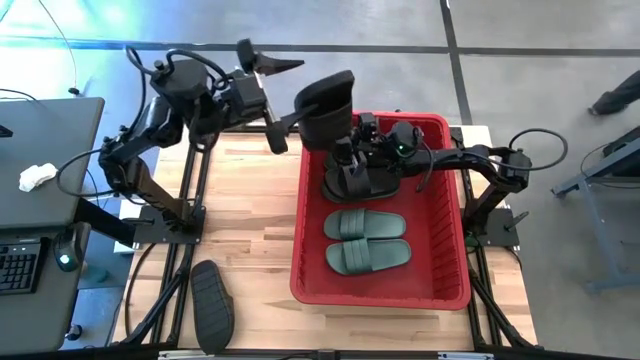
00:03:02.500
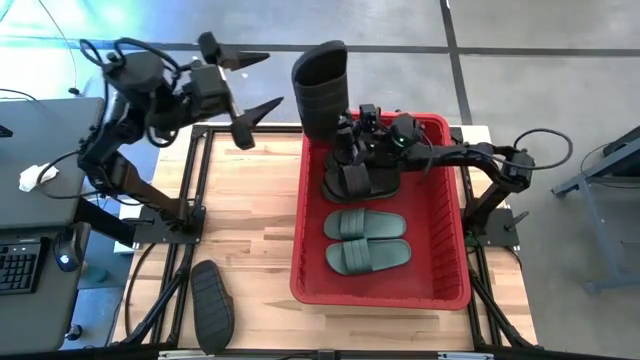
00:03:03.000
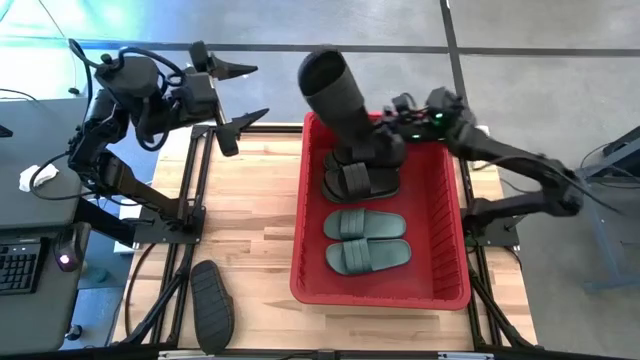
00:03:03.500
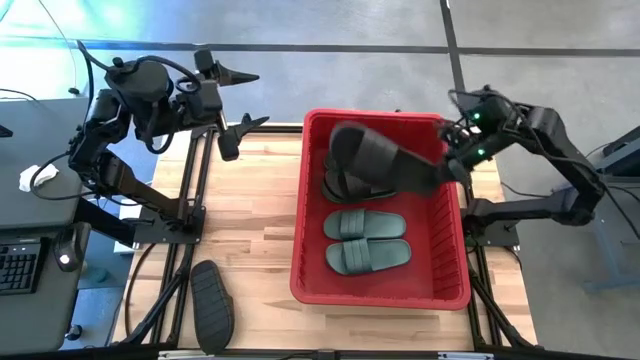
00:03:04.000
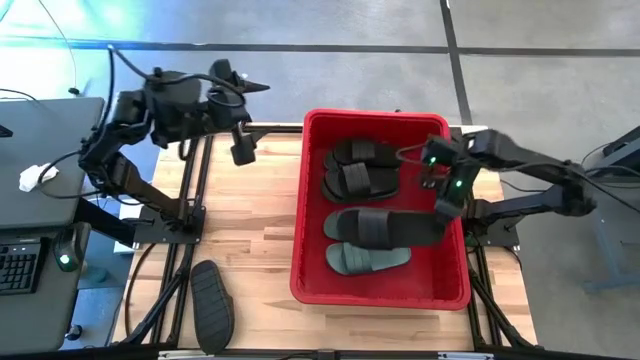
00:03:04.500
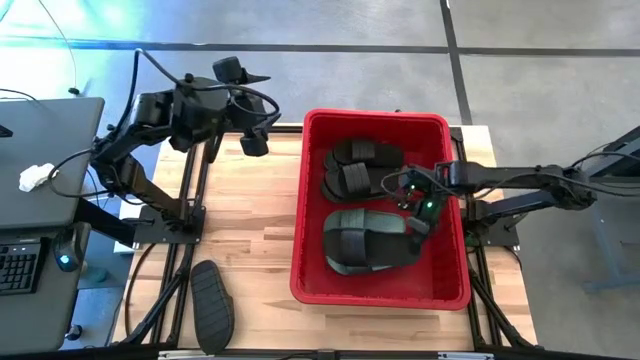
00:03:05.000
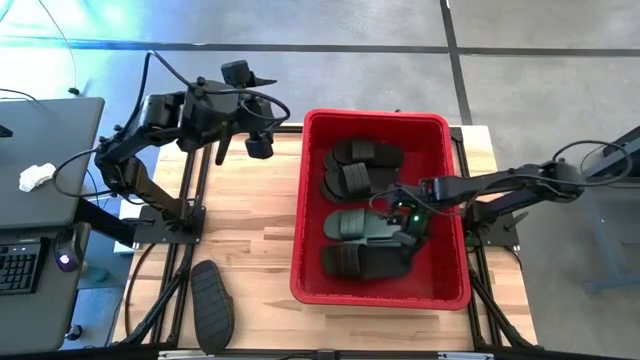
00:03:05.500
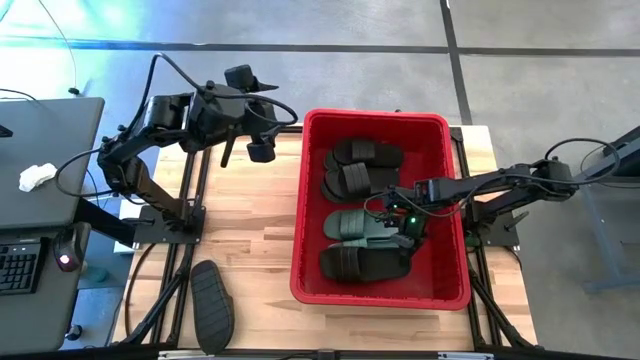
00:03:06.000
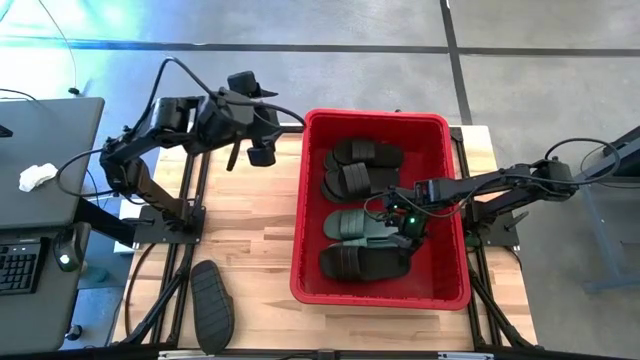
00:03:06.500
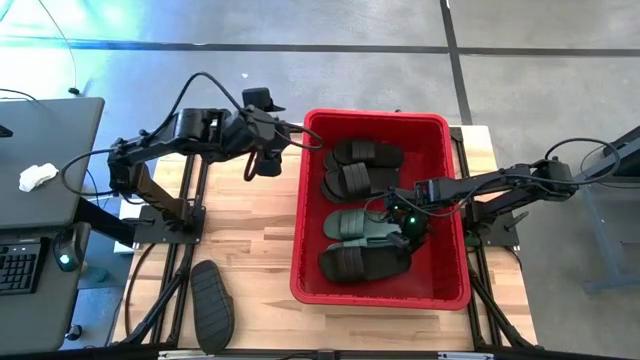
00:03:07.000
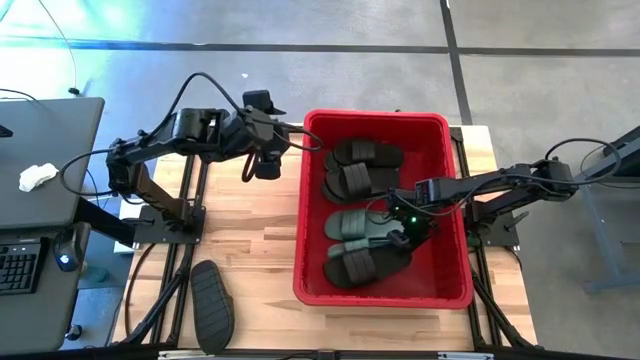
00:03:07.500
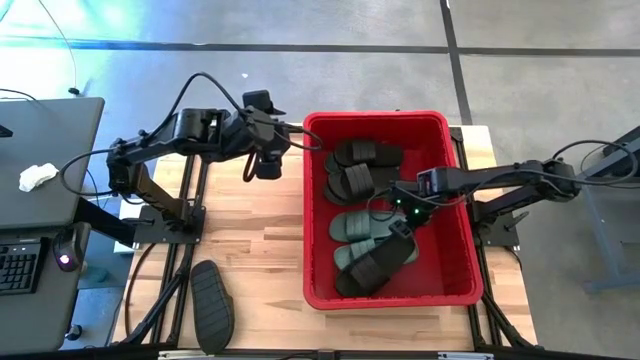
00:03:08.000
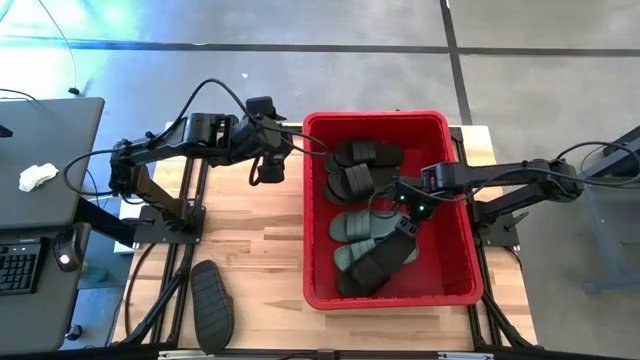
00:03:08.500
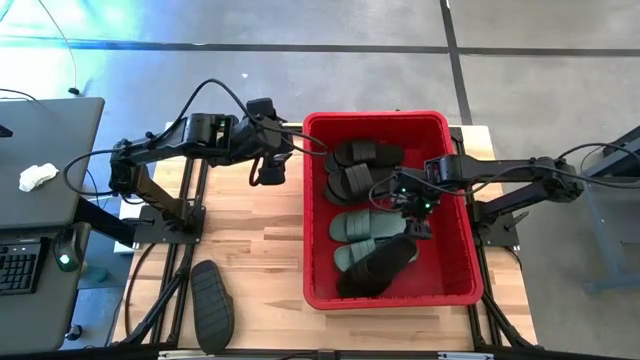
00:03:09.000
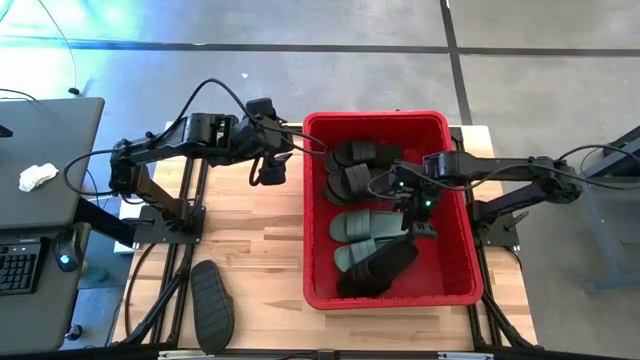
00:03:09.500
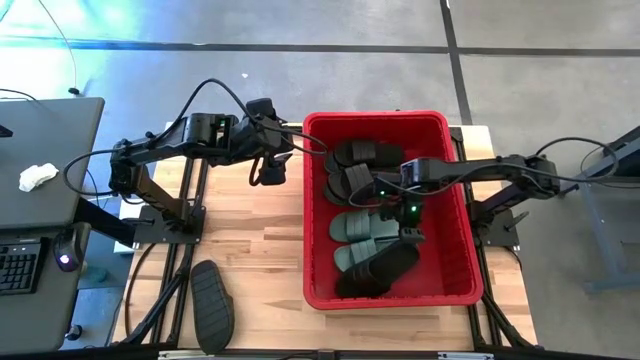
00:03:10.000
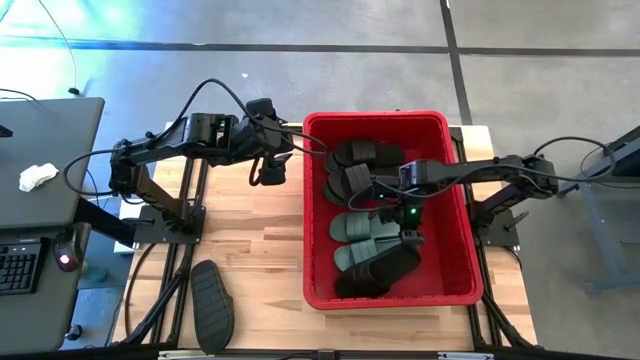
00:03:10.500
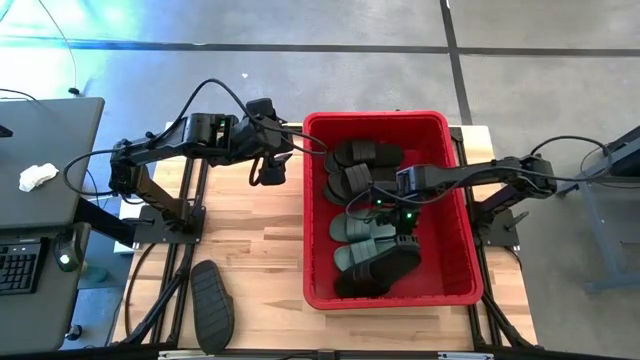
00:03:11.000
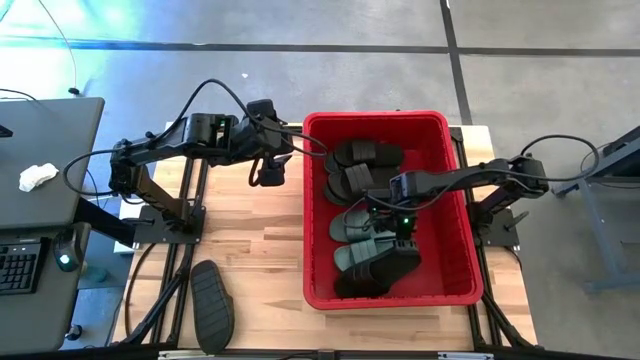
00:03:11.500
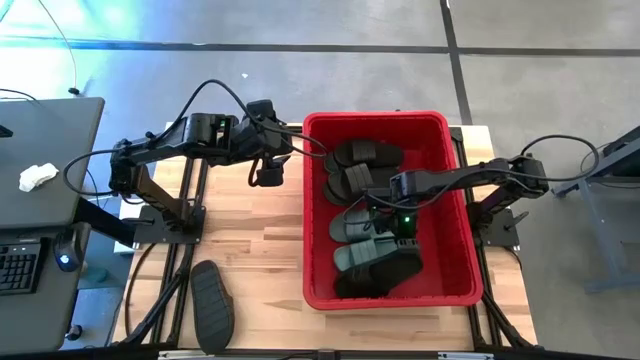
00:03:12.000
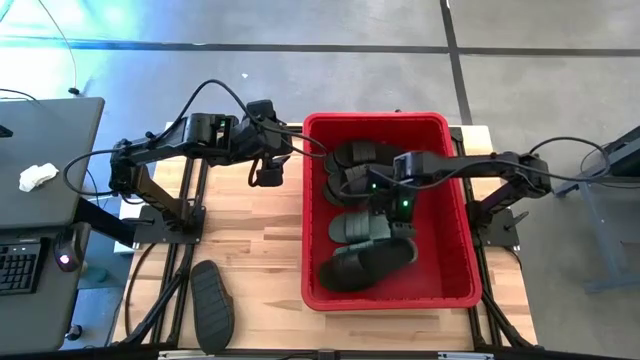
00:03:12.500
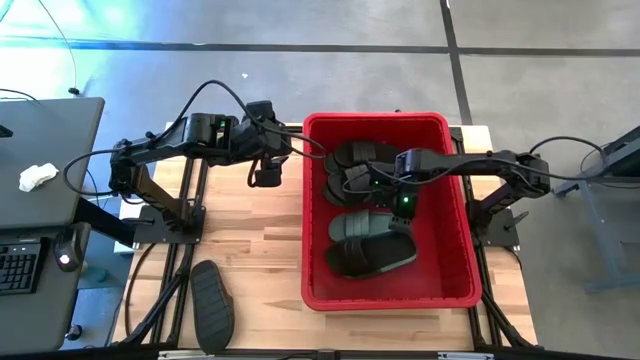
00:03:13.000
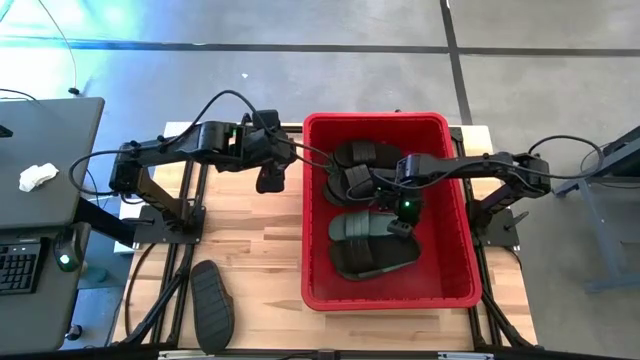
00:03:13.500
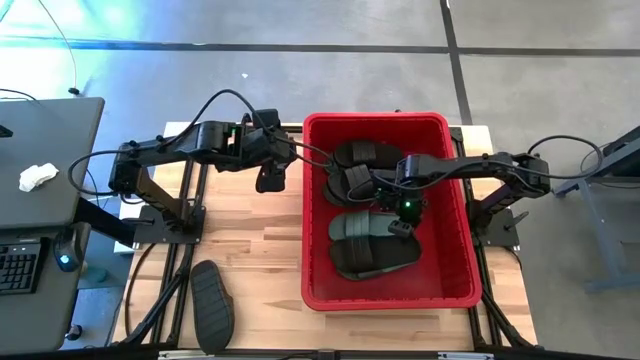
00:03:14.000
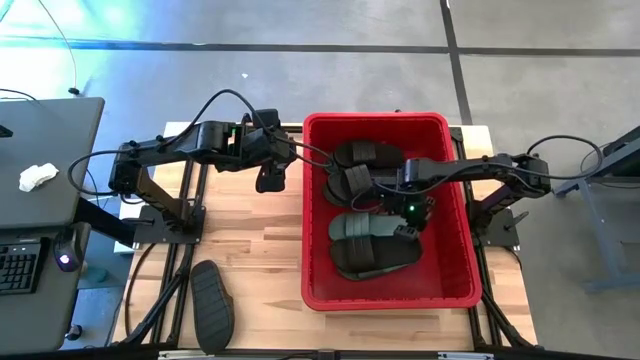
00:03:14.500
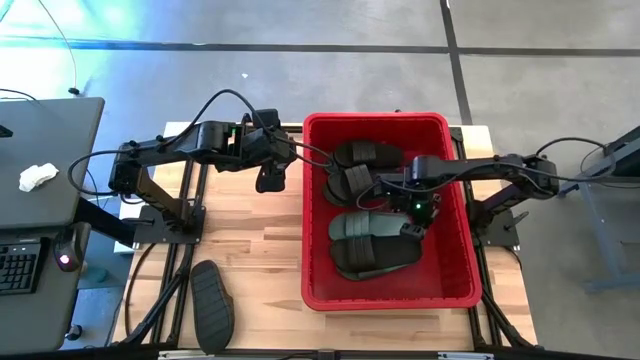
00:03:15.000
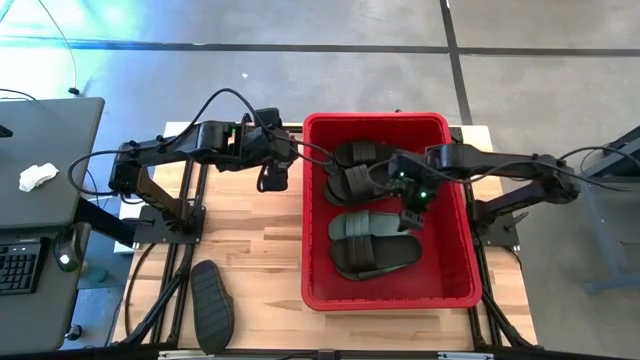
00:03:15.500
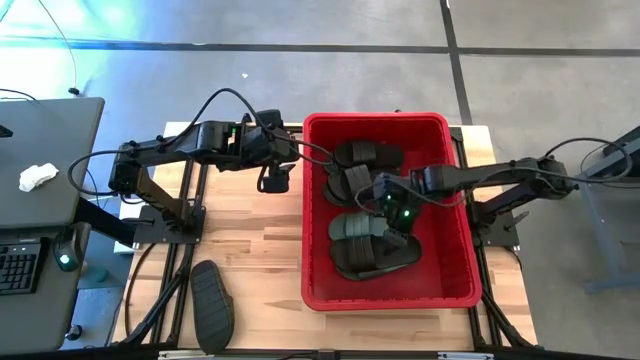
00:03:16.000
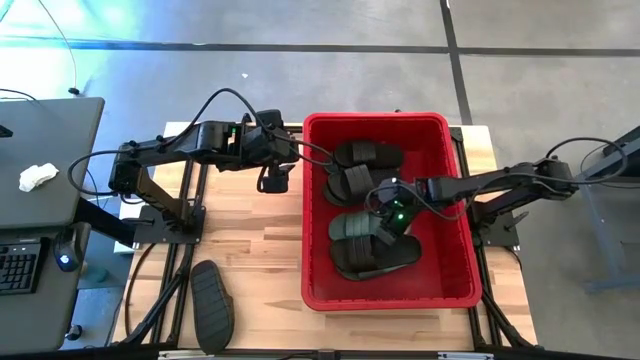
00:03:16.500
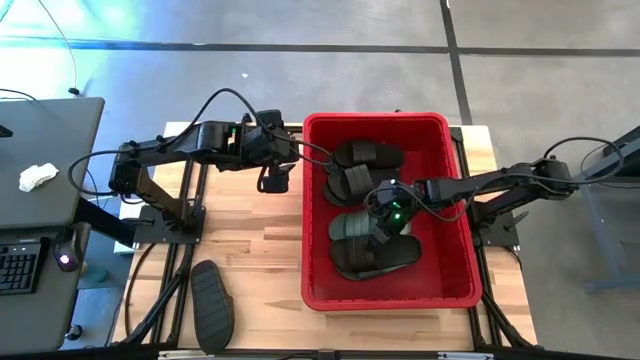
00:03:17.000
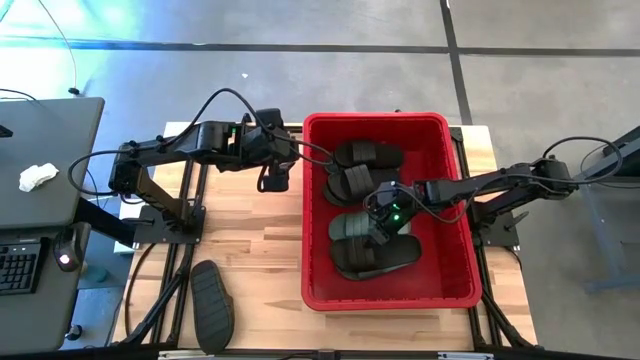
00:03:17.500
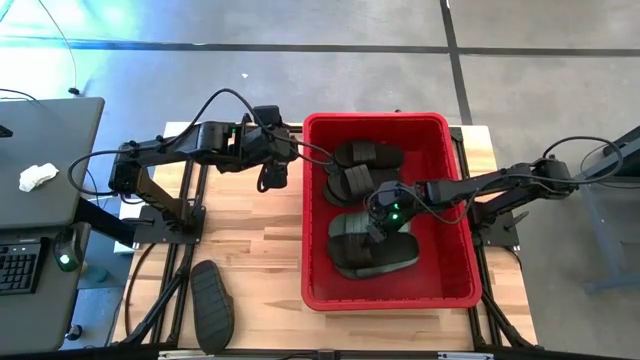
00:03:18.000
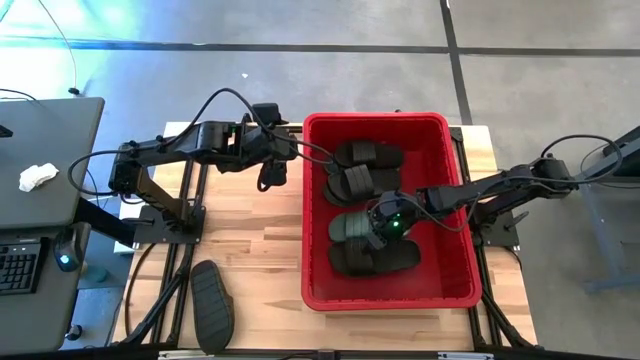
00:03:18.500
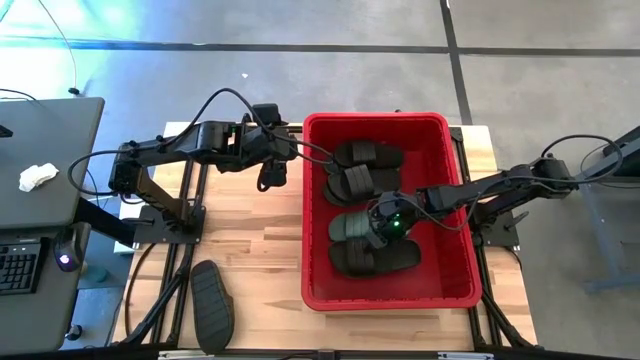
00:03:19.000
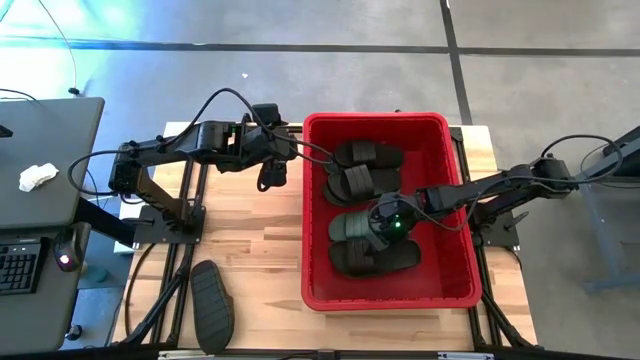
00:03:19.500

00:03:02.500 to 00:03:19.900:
Task: Pick and place slides into bin
Put the black slide into the red container

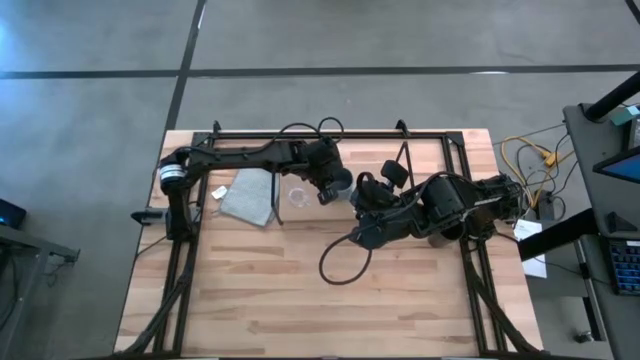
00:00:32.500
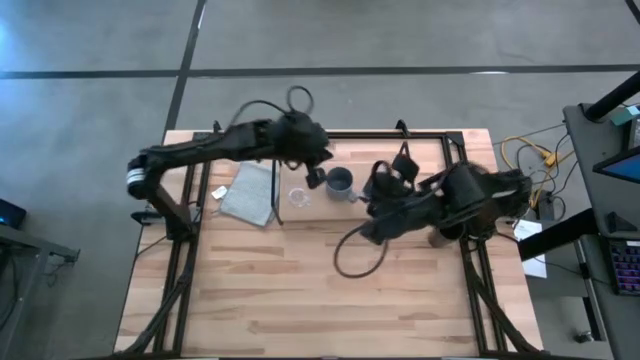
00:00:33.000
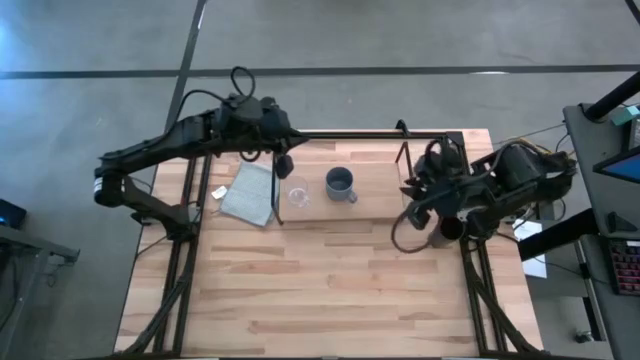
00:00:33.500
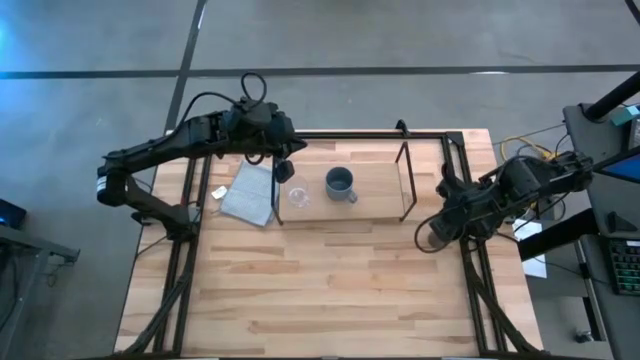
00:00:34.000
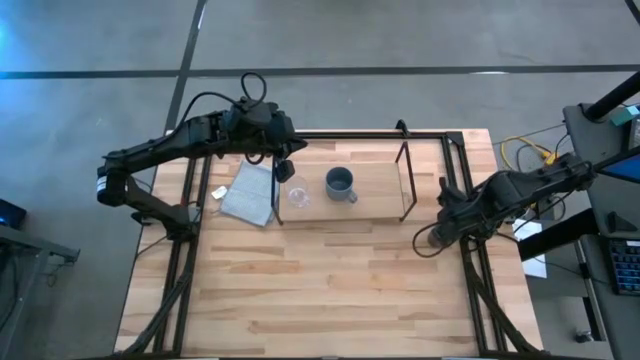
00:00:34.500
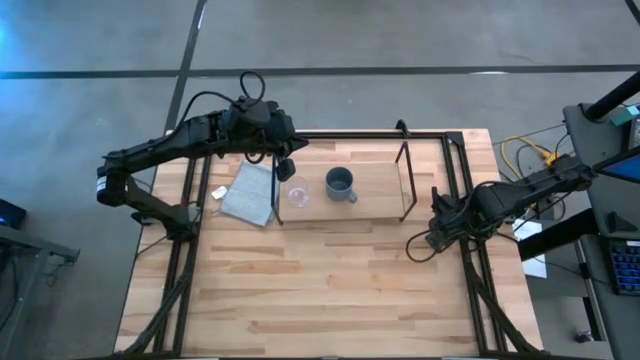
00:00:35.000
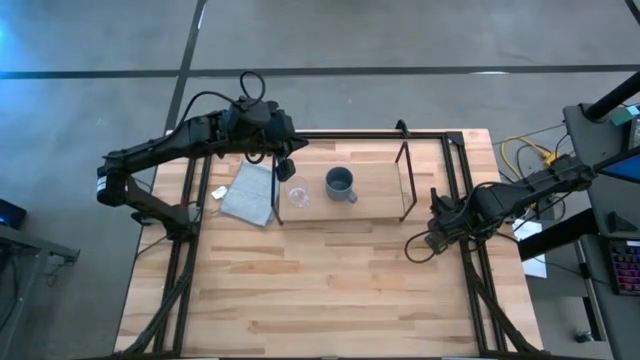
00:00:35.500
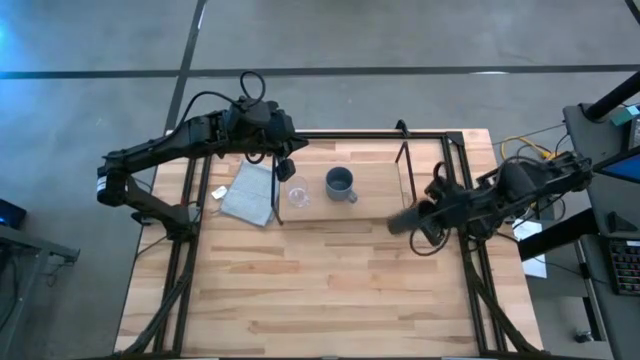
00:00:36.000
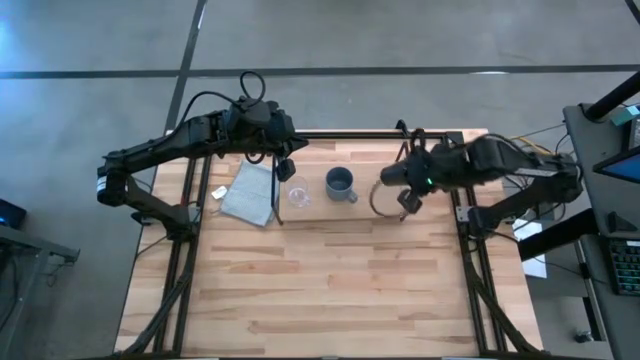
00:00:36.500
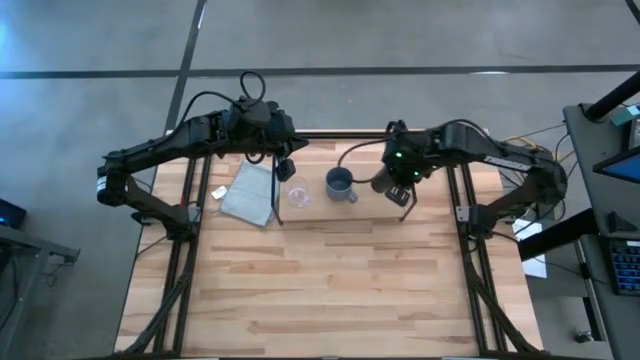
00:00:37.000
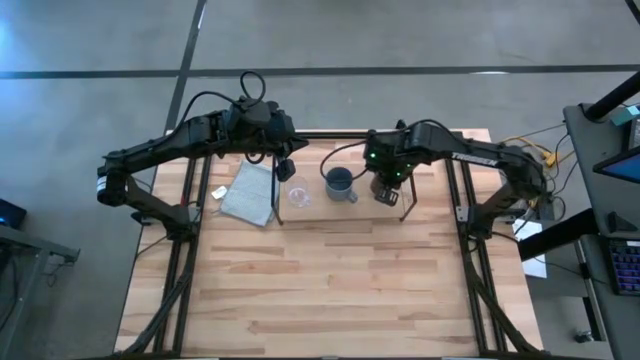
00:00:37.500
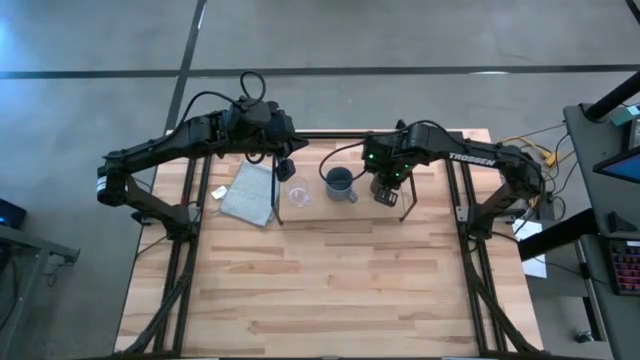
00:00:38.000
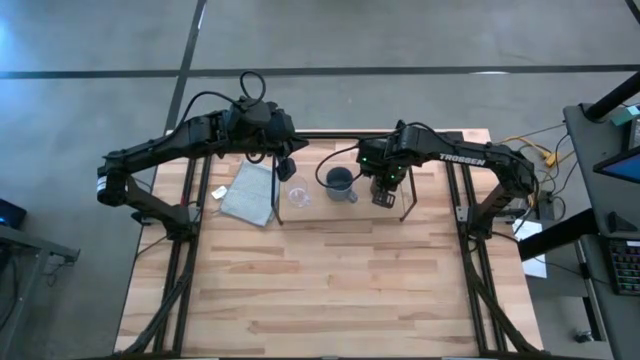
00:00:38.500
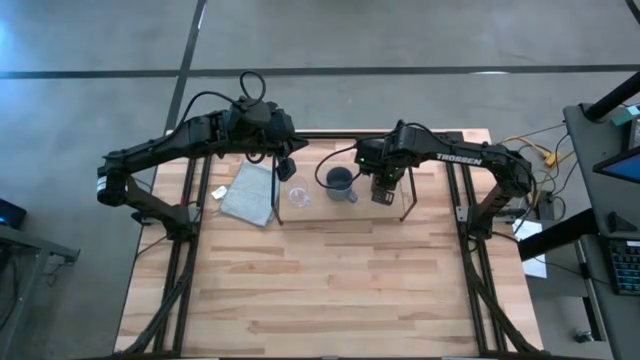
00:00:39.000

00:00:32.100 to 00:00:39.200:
Task: Stack small to large cups/mugs on shelf
Put the black cup on the shelf
